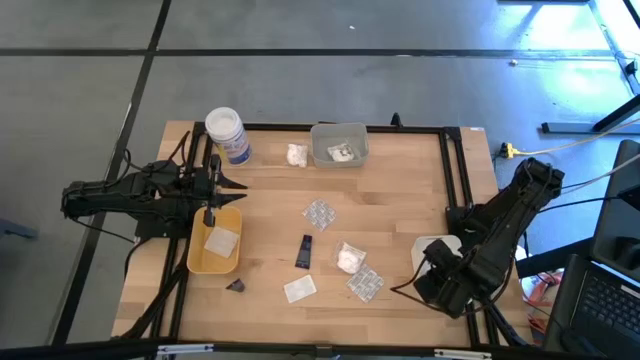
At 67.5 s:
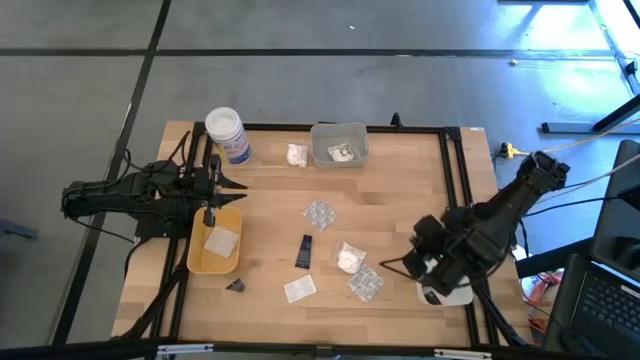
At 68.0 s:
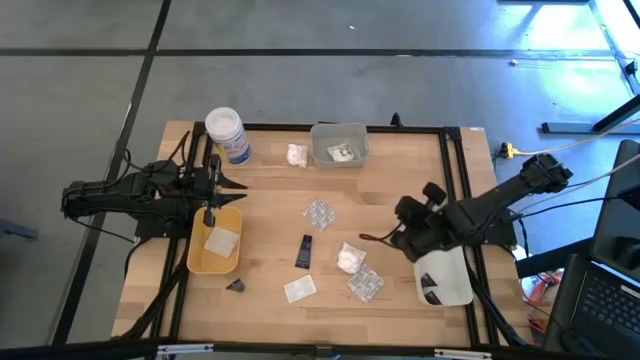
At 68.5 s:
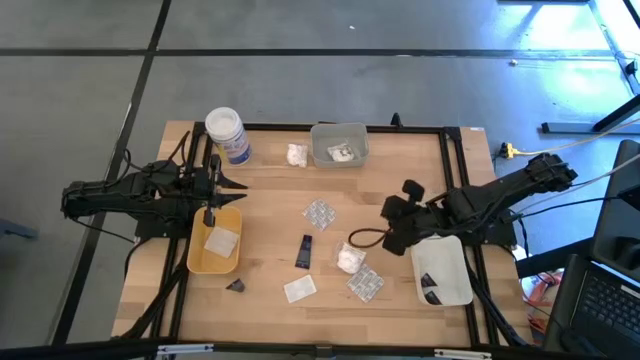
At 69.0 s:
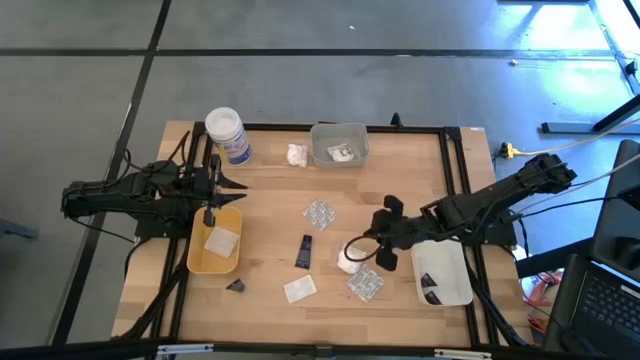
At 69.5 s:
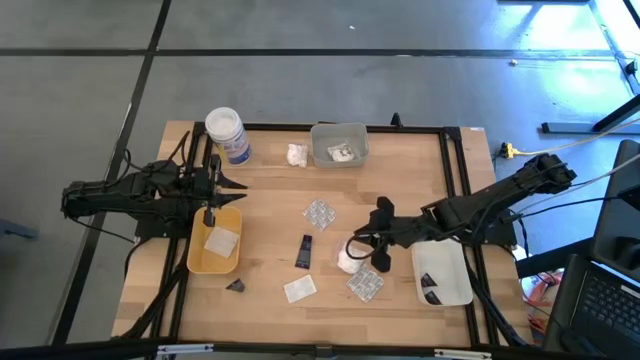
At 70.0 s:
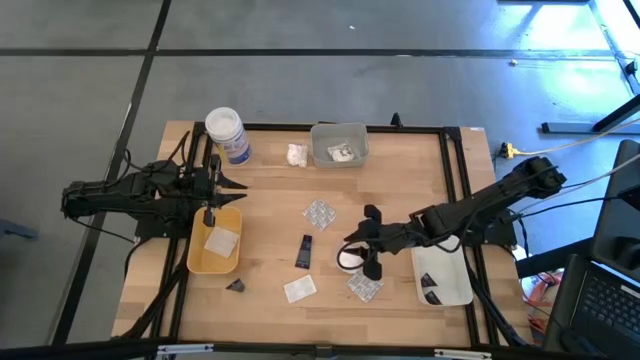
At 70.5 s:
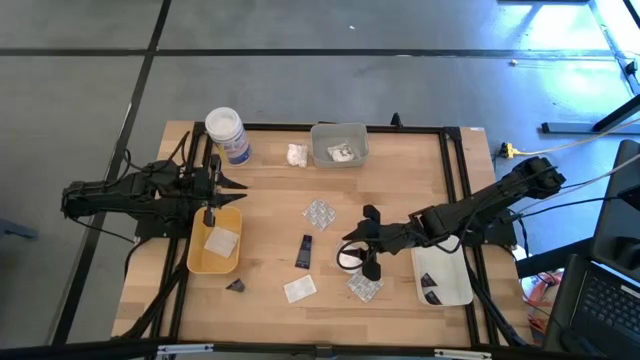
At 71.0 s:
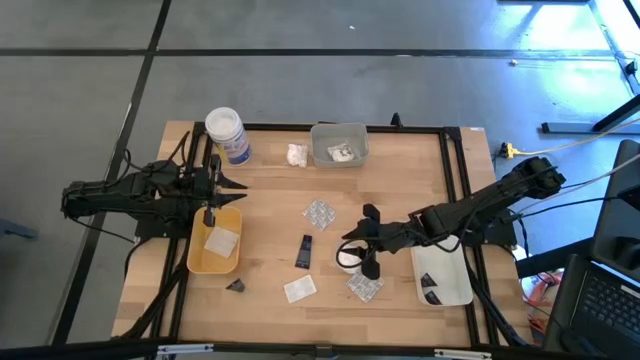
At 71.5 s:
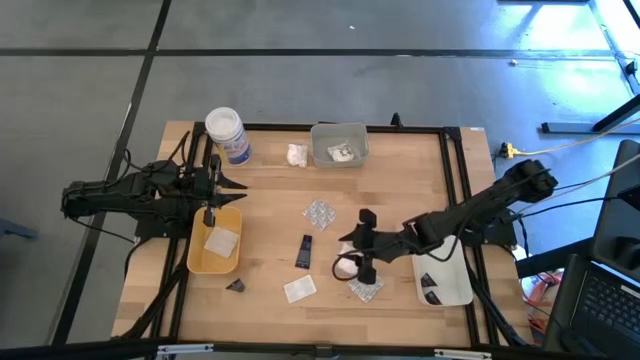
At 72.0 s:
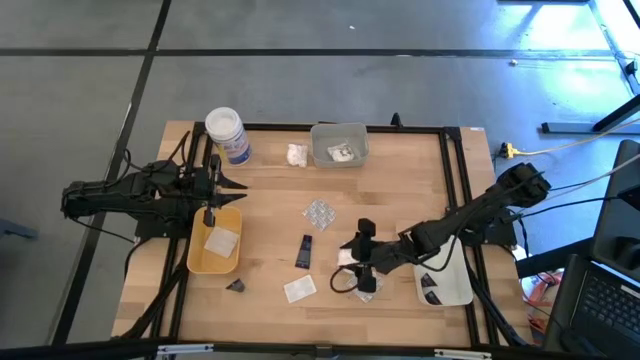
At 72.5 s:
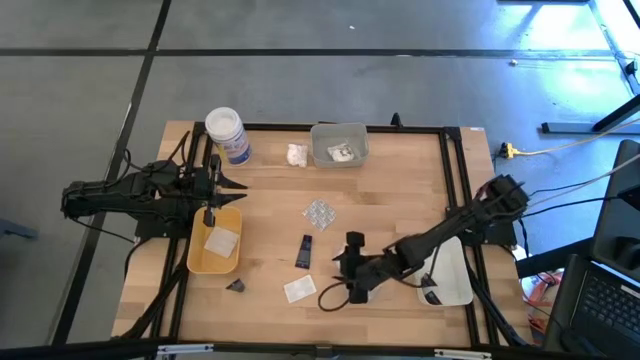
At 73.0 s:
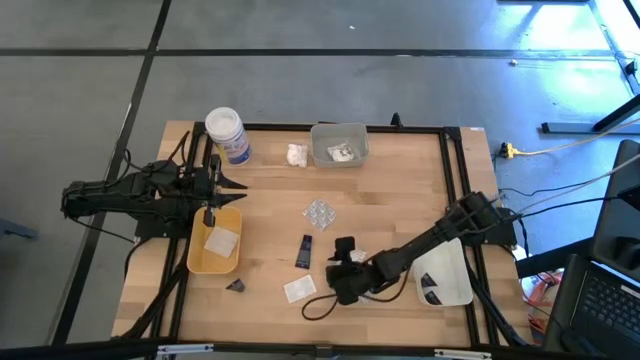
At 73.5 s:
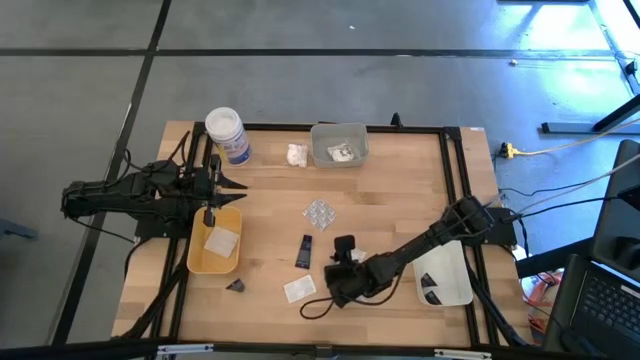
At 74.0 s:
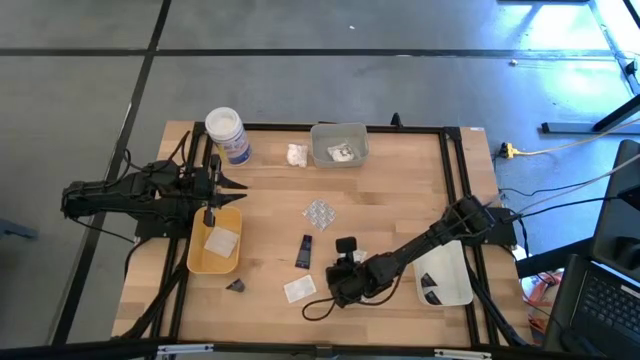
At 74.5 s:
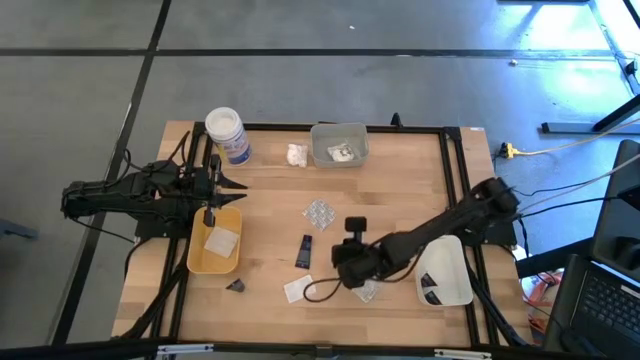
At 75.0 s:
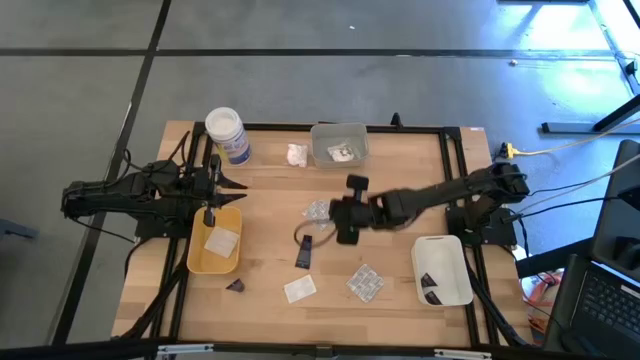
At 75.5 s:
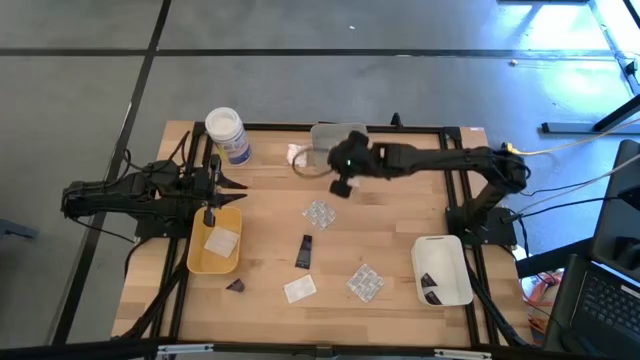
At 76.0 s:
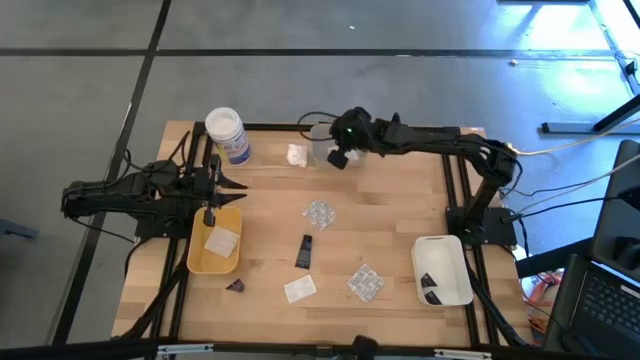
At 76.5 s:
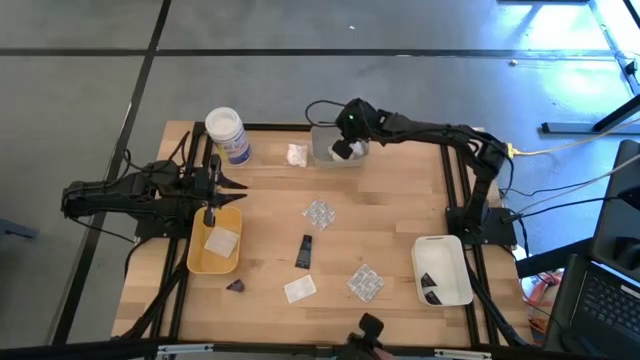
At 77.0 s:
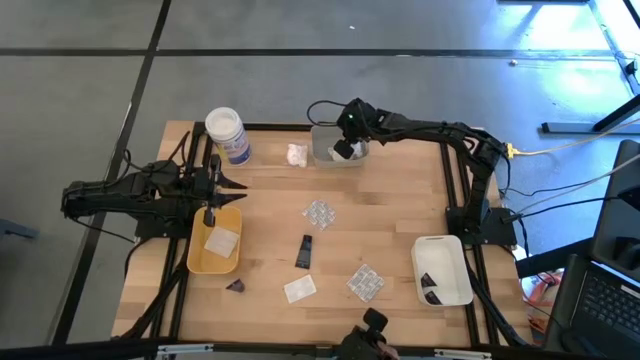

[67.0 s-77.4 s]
Task: Pick & Place Travel size toiletries
Put the white cotton pack into the gray bin

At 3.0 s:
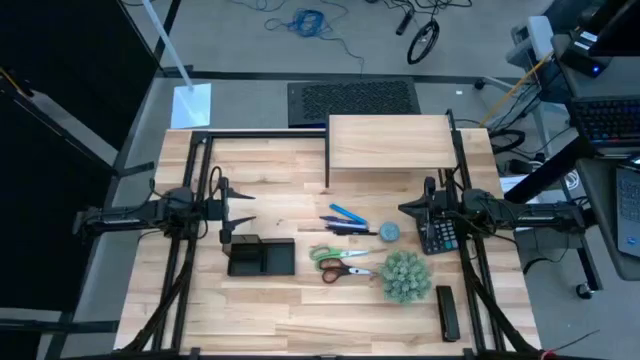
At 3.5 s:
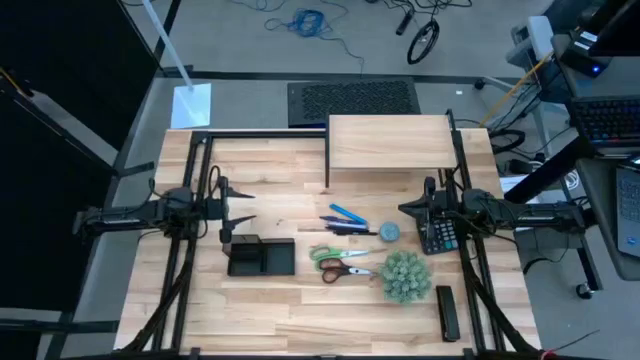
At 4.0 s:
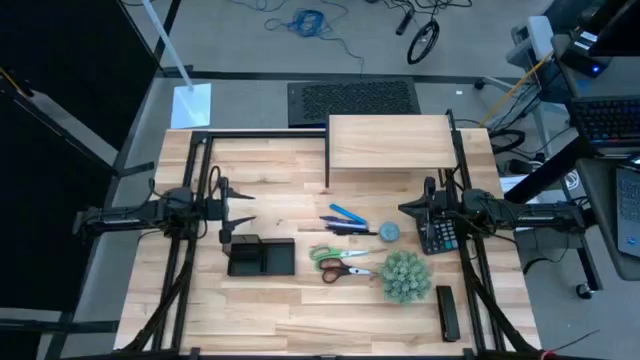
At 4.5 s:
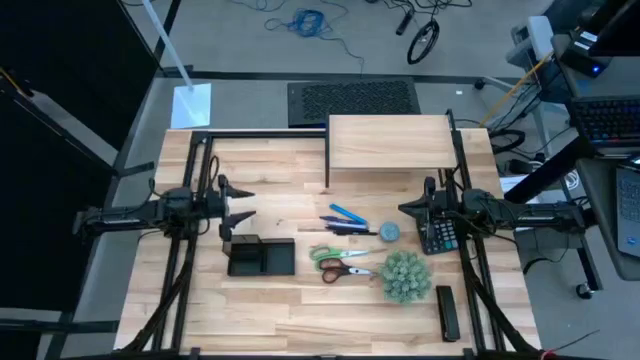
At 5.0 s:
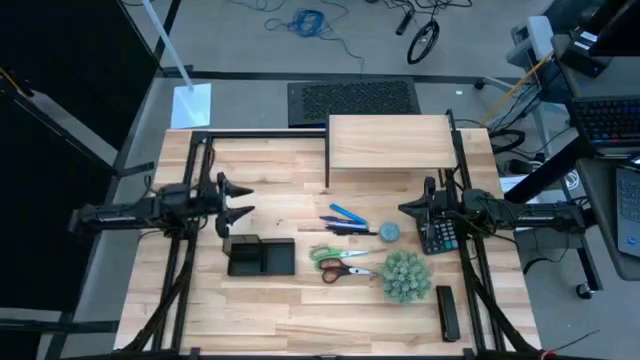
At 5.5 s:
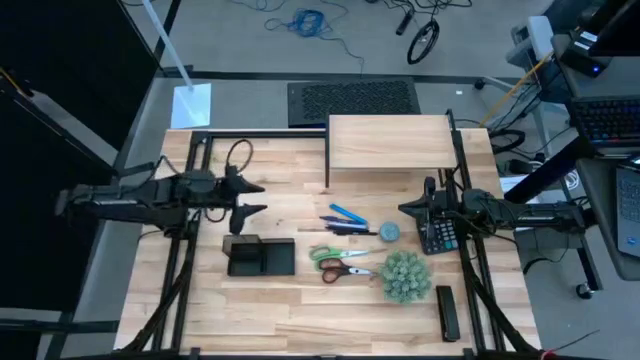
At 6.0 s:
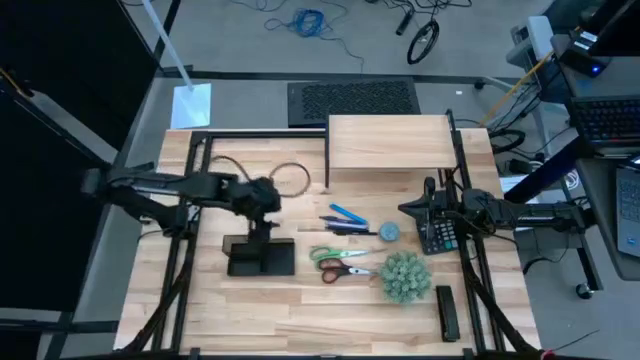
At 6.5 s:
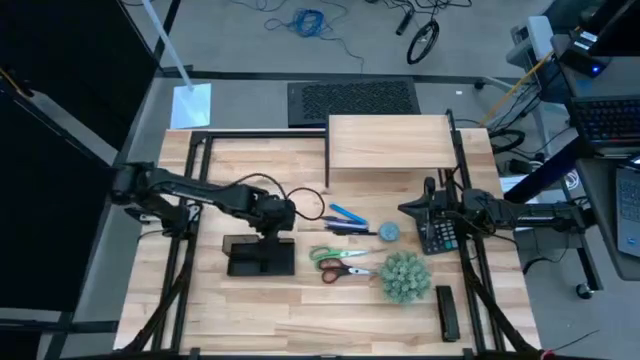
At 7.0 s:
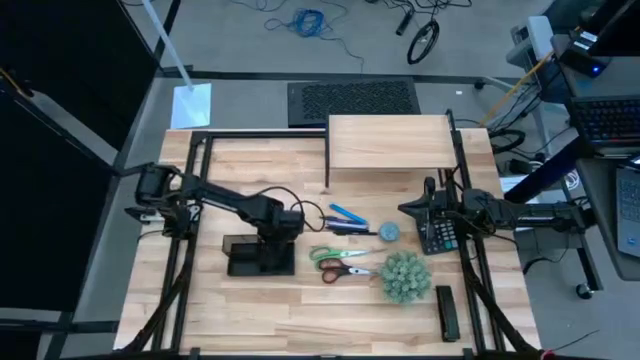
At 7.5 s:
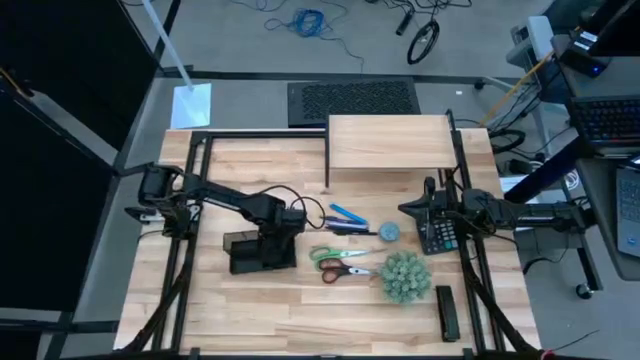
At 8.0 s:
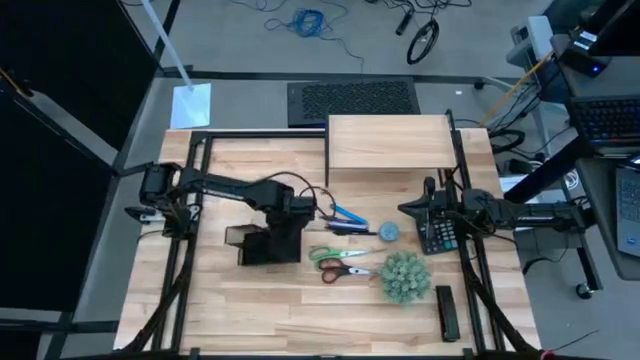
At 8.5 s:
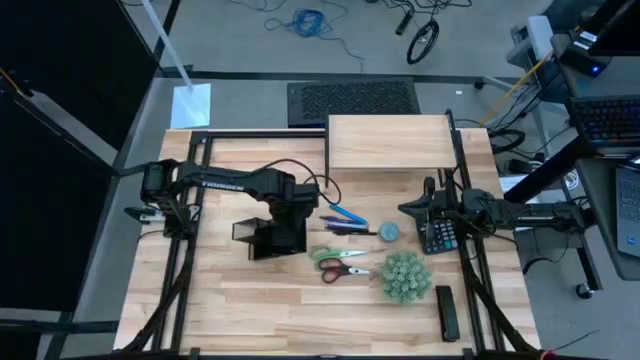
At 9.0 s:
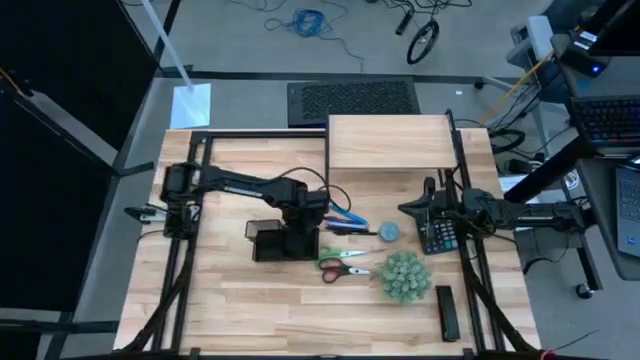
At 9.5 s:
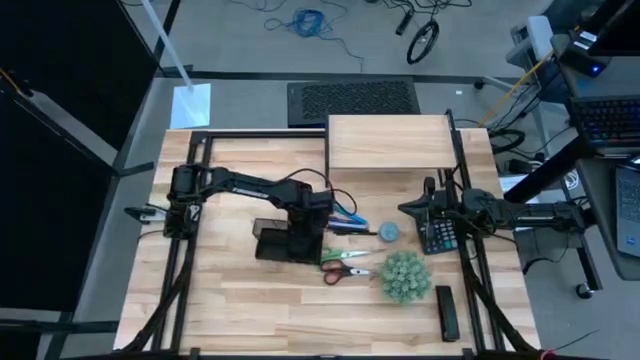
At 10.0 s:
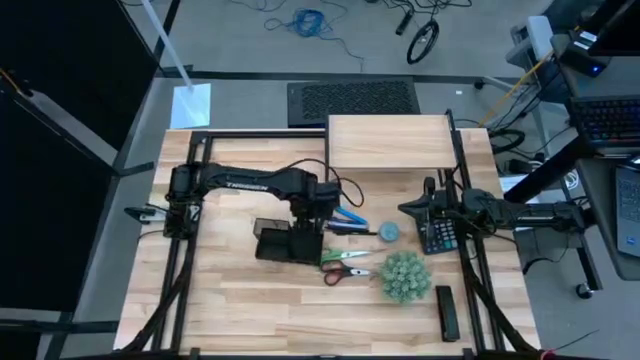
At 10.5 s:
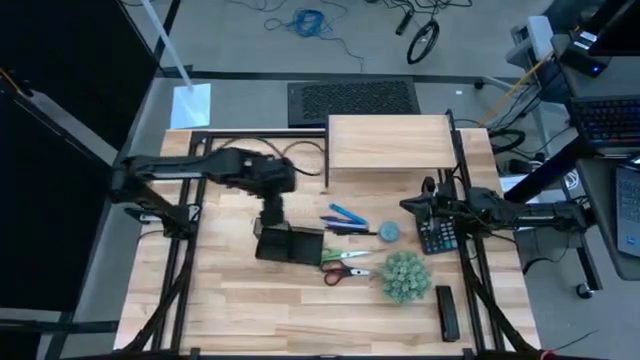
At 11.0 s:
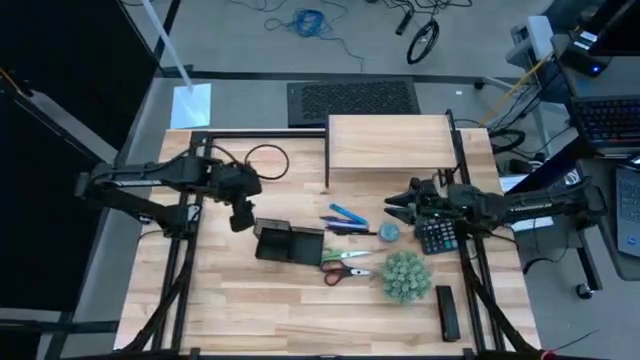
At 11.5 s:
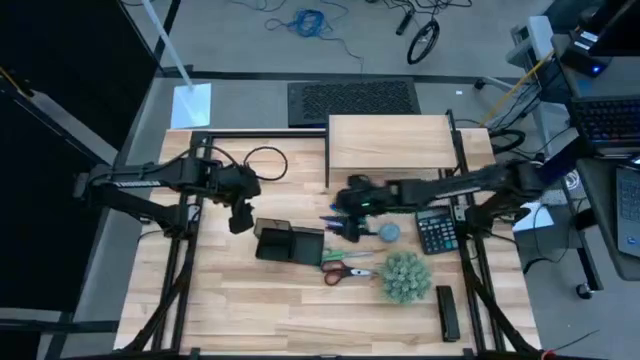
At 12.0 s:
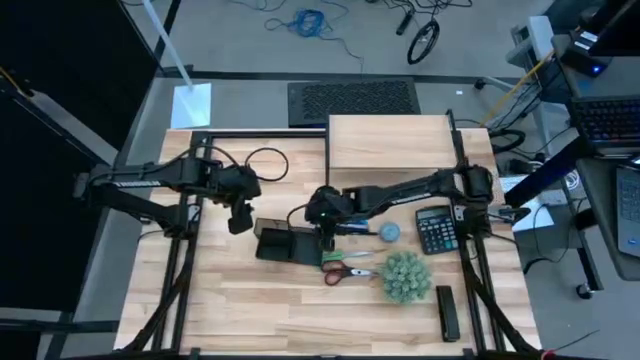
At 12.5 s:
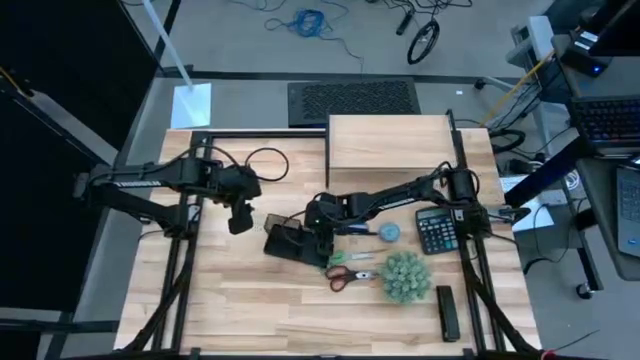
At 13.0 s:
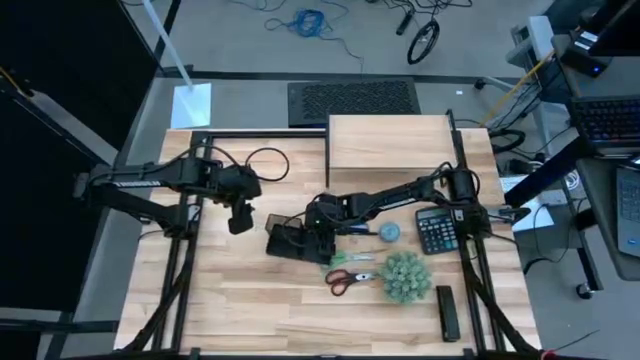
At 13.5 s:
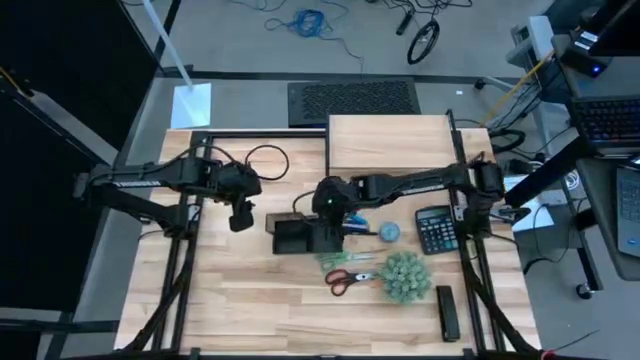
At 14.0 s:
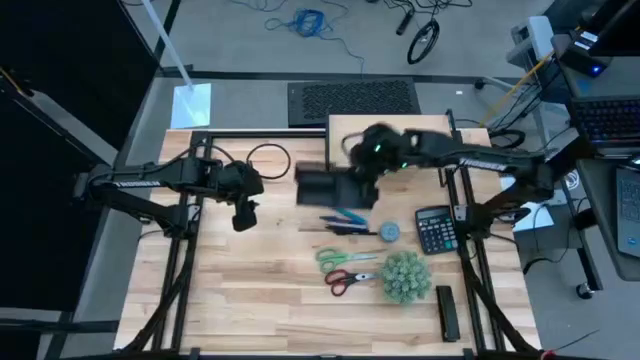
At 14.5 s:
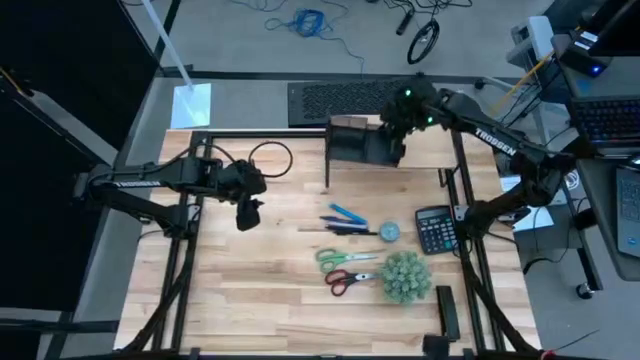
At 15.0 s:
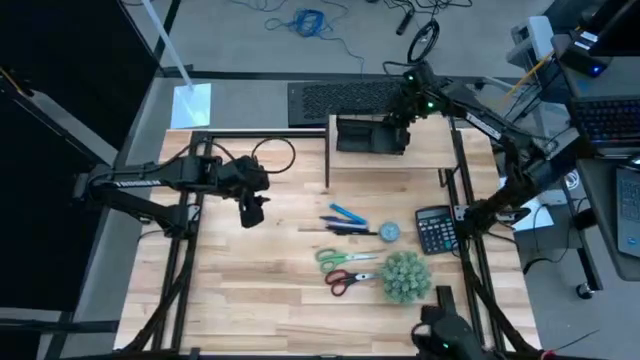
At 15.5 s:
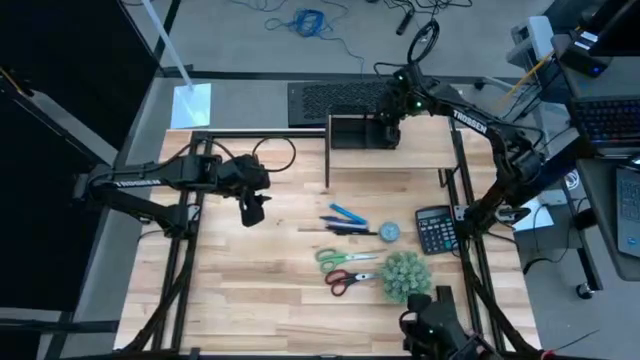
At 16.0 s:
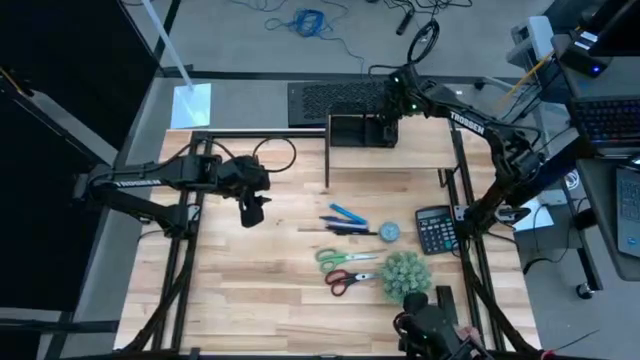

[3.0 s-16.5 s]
Task: Pick and place office supplies into organizer
Put the black desk organizer on the shelf
